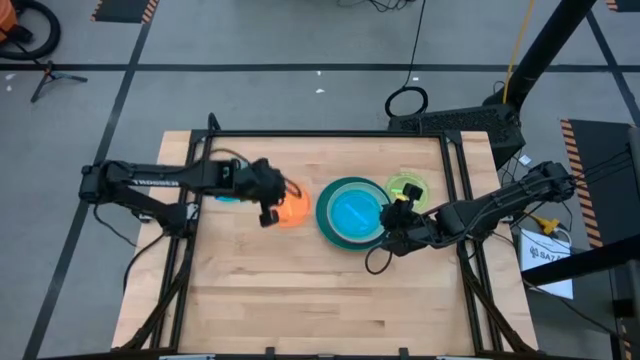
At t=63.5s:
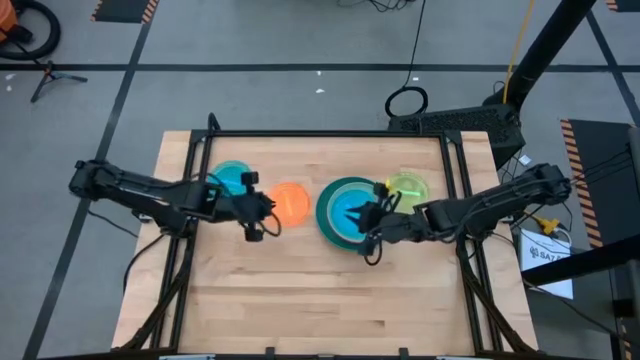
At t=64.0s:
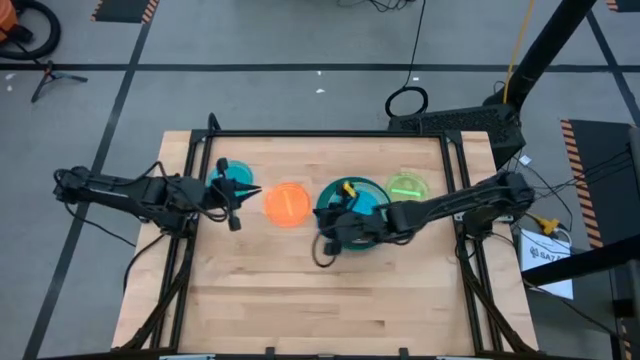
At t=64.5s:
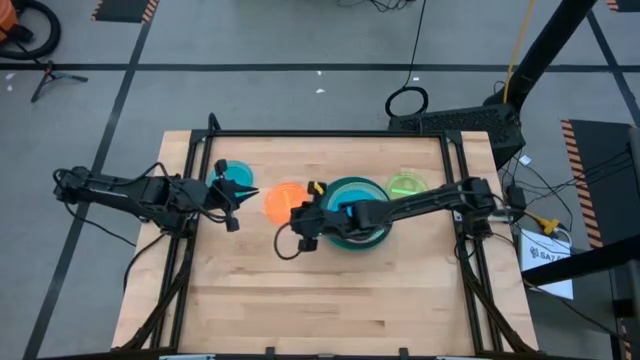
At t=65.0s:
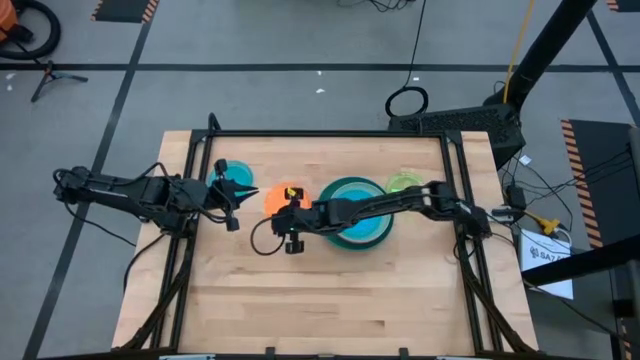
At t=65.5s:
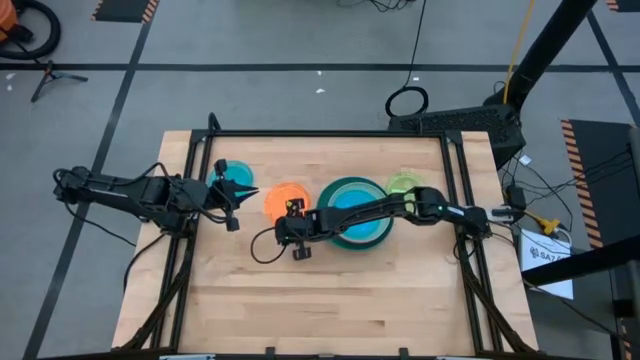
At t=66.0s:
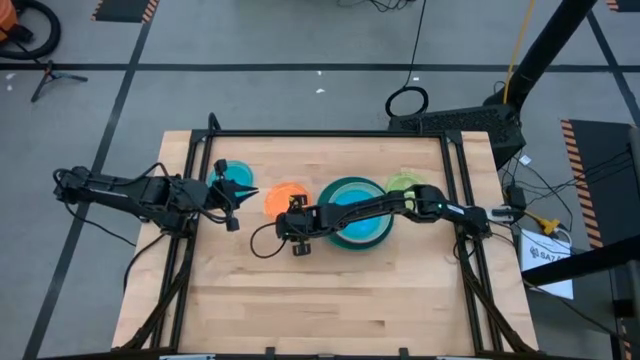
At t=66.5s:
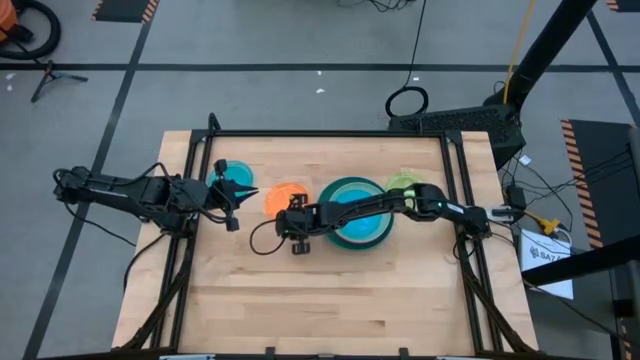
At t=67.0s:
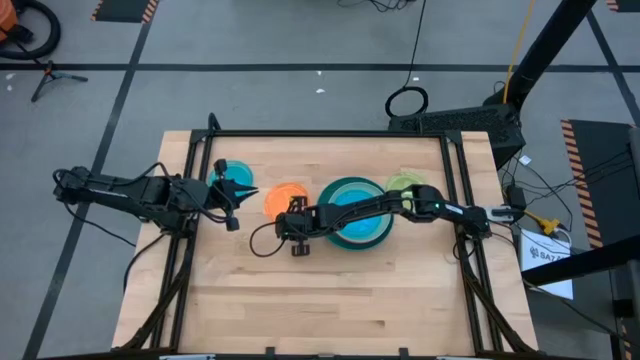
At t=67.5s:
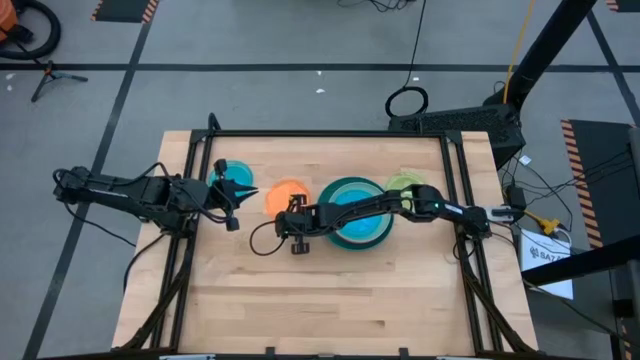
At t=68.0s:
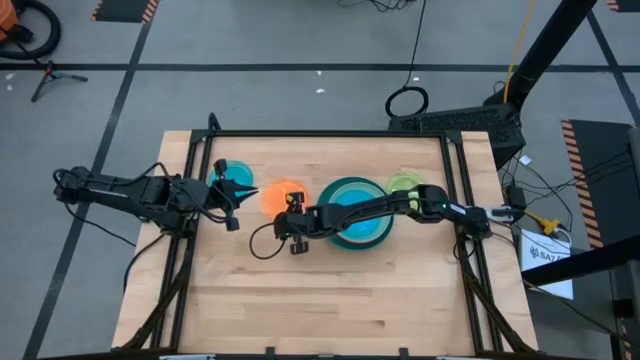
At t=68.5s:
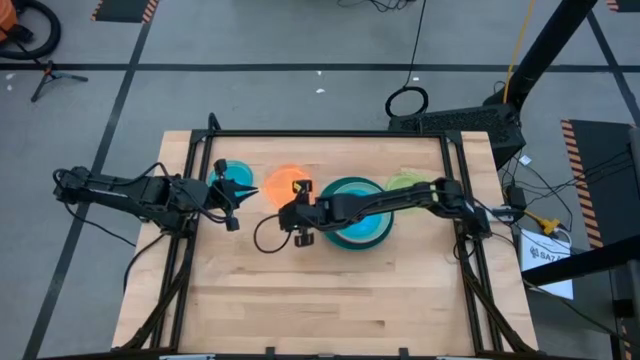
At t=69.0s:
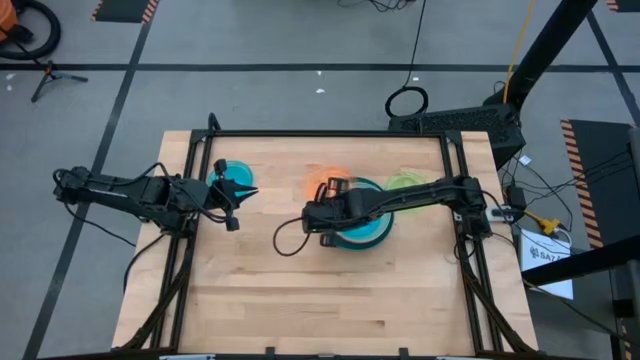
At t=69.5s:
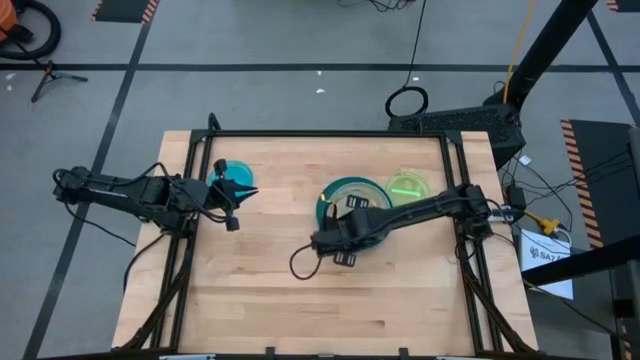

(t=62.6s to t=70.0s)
Task: Stack plastic plates
Stack the orange plate on top of the blue plate

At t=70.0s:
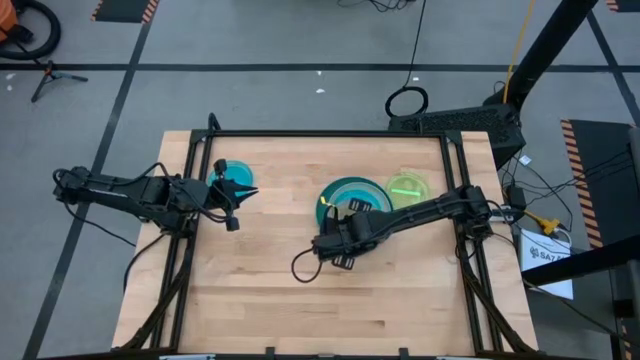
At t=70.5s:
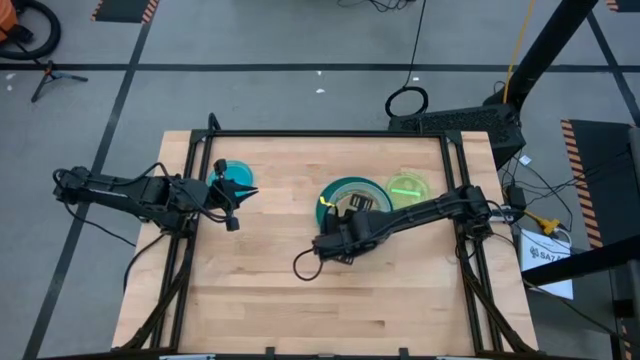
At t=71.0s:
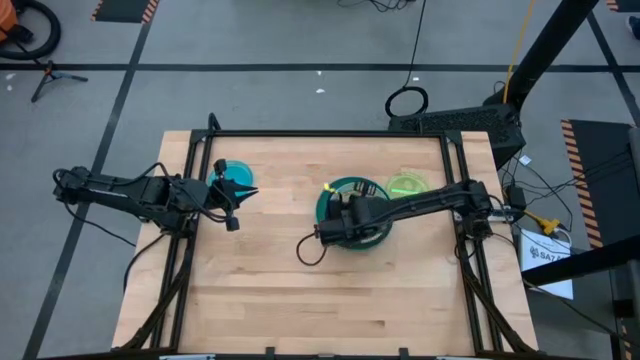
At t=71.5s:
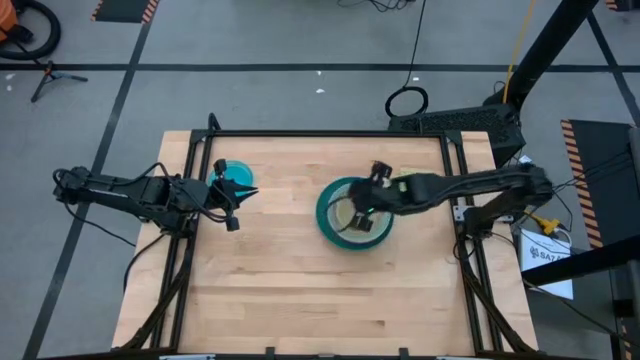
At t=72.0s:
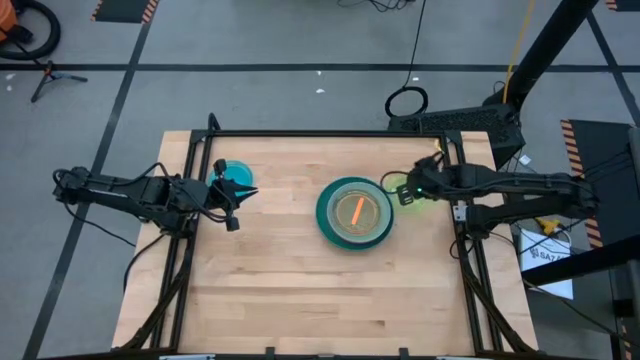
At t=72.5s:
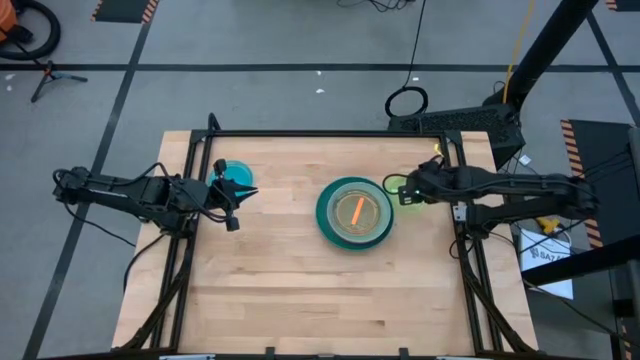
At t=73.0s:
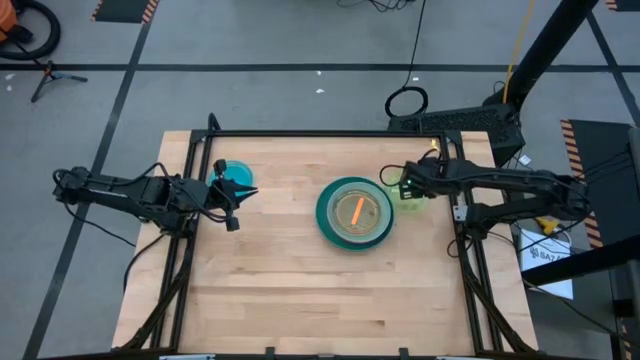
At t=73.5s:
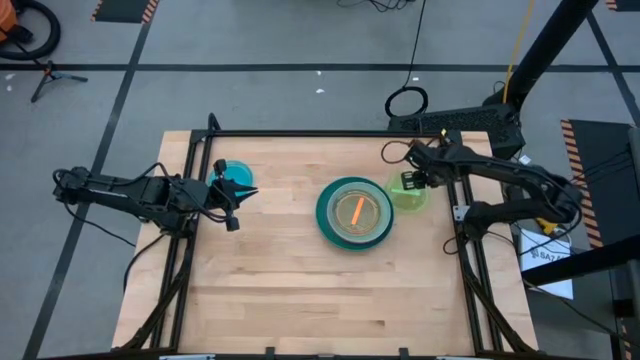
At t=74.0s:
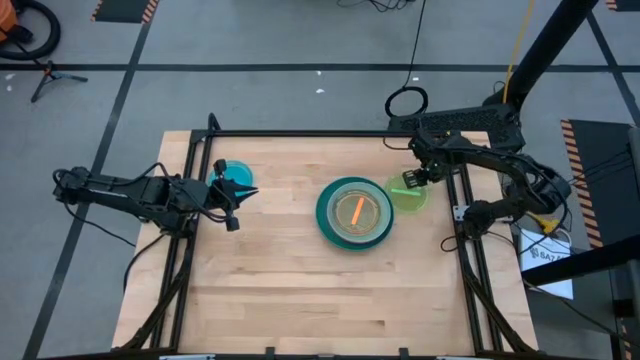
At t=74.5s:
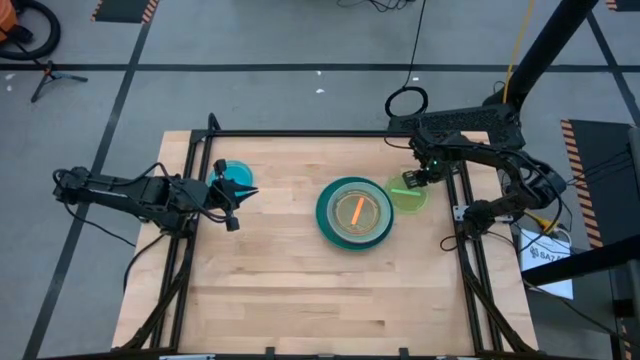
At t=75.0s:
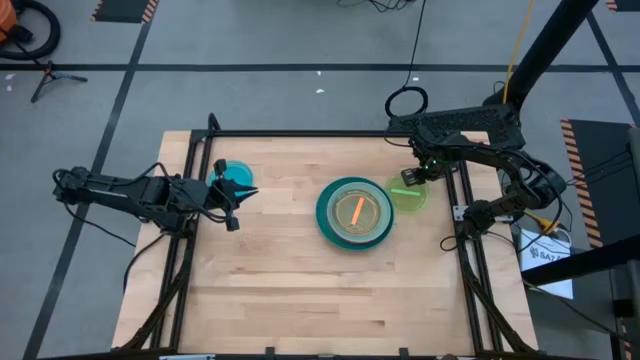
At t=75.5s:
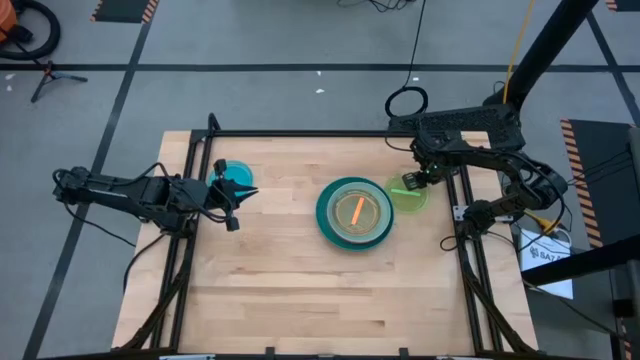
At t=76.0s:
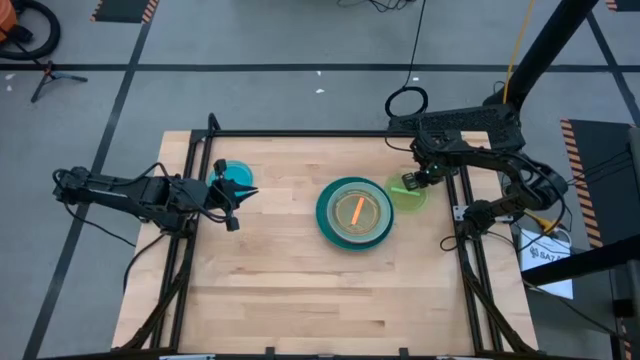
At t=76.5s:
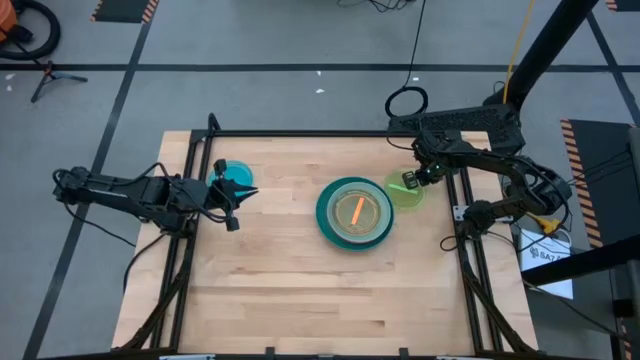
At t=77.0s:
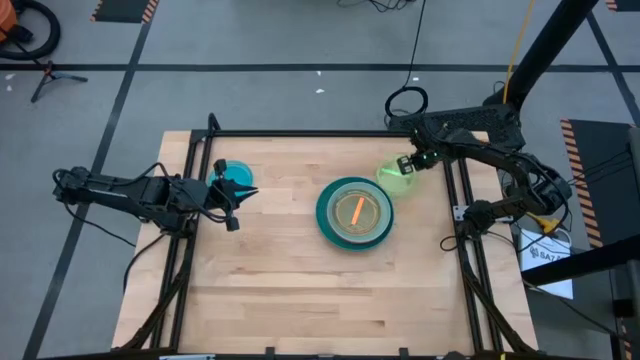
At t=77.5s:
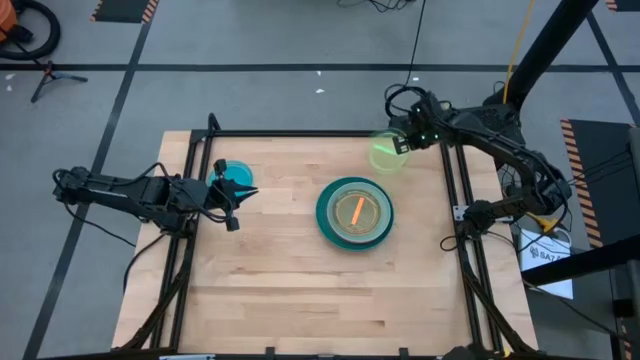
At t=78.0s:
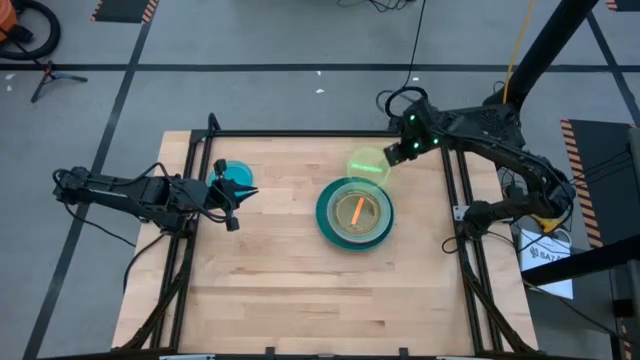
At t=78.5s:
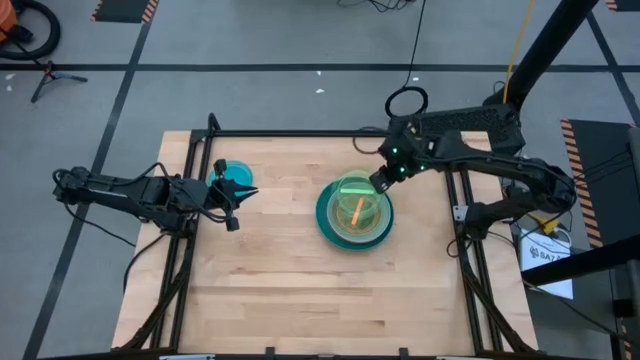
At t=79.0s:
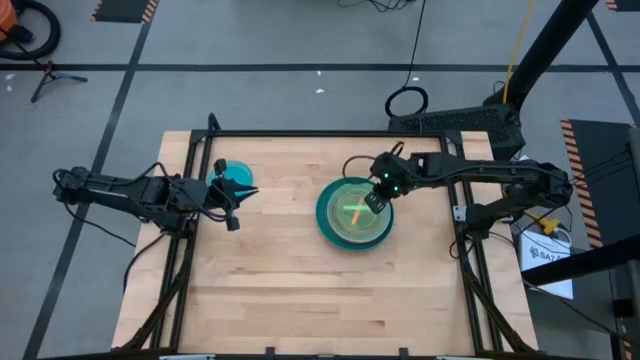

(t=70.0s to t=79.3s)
Stack the green plate on top of the orange plate

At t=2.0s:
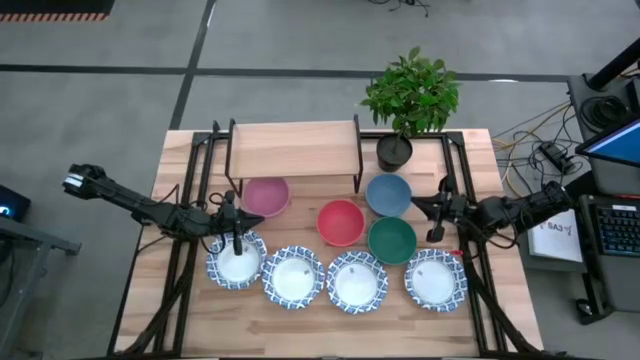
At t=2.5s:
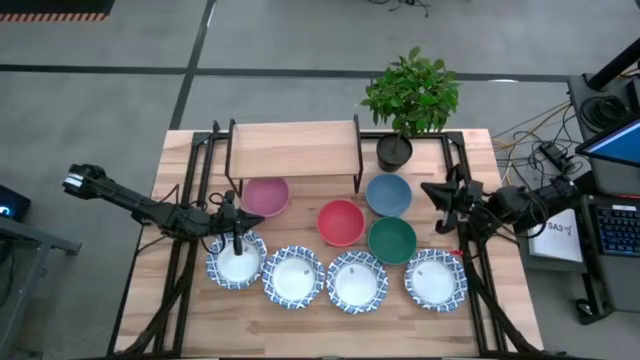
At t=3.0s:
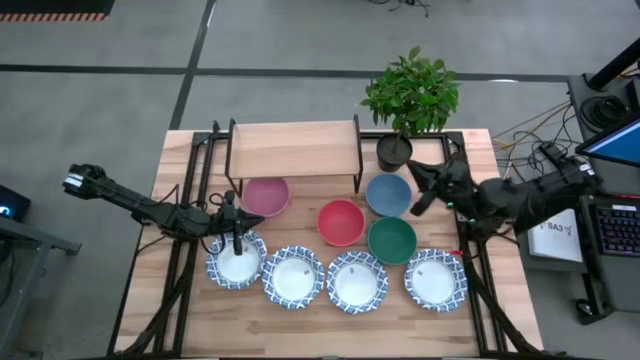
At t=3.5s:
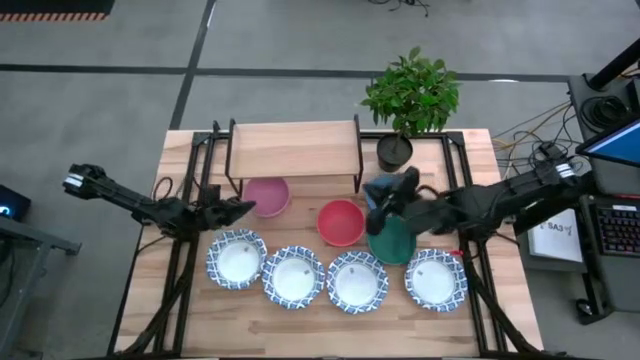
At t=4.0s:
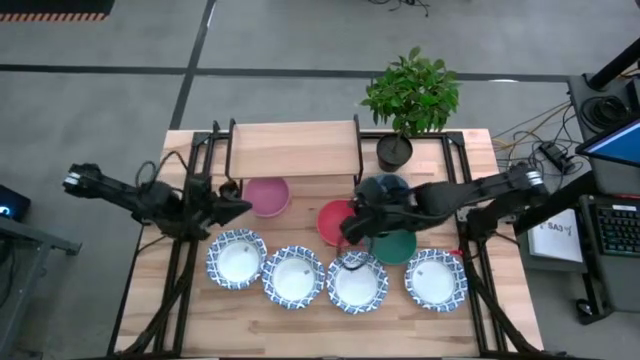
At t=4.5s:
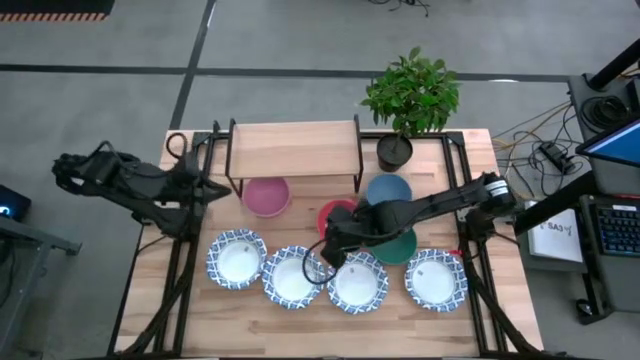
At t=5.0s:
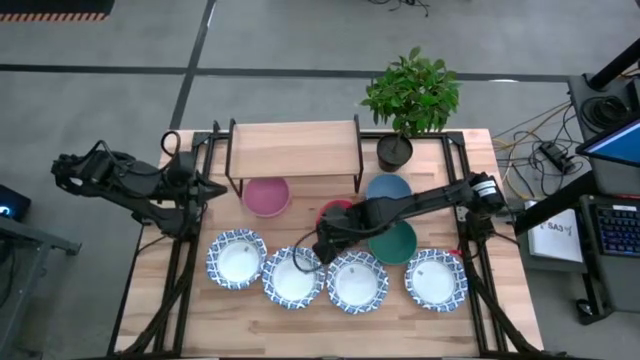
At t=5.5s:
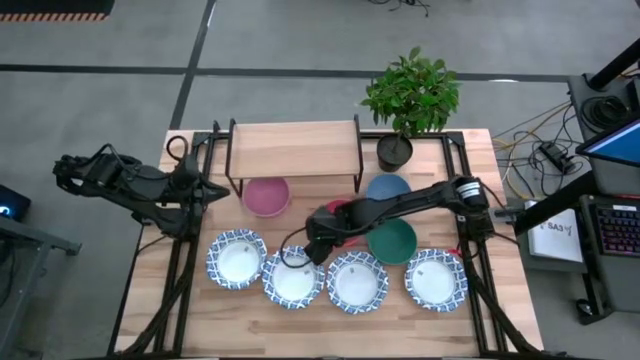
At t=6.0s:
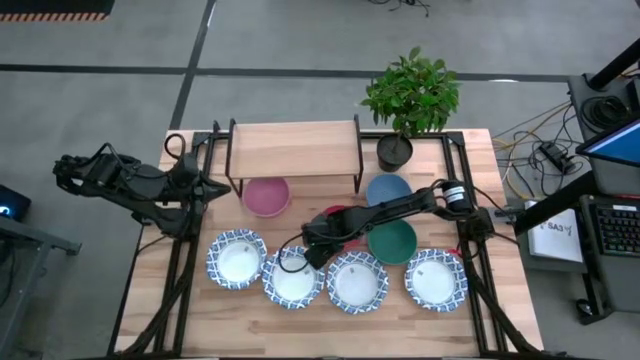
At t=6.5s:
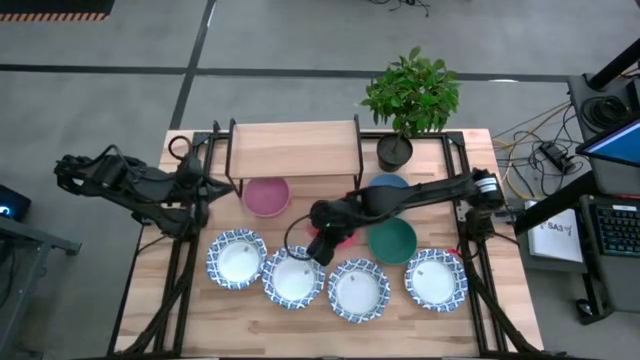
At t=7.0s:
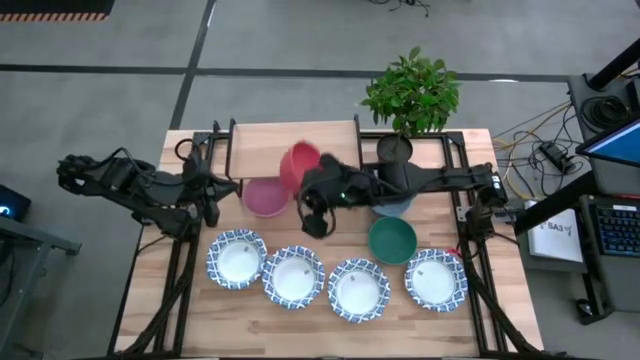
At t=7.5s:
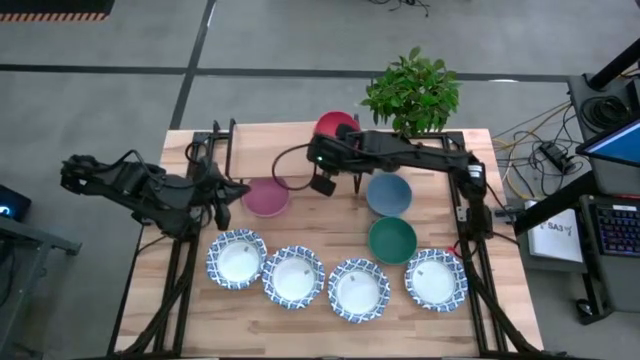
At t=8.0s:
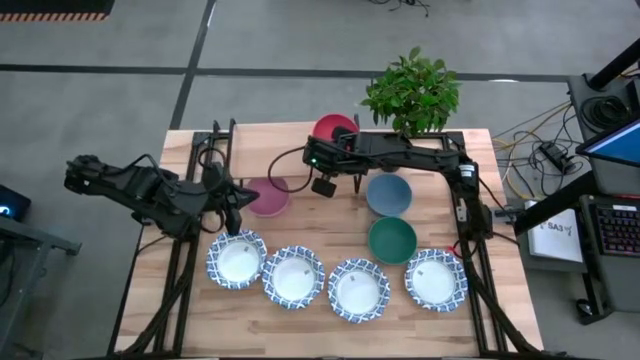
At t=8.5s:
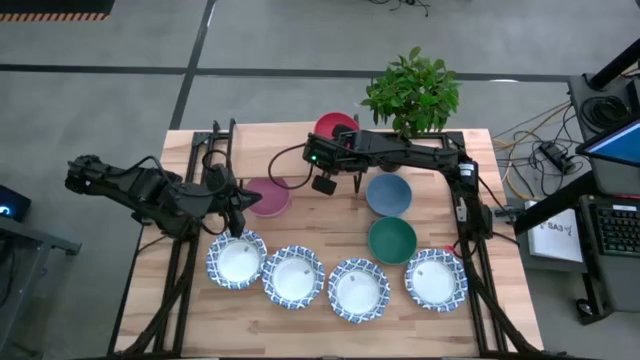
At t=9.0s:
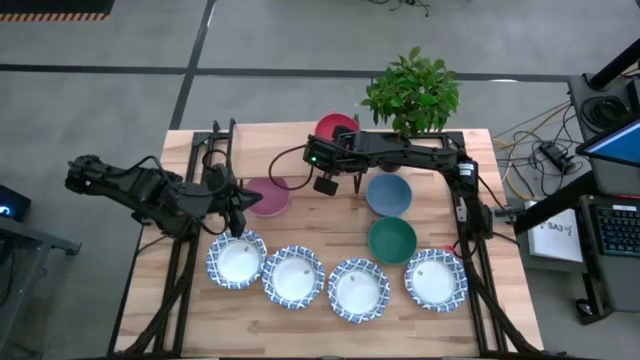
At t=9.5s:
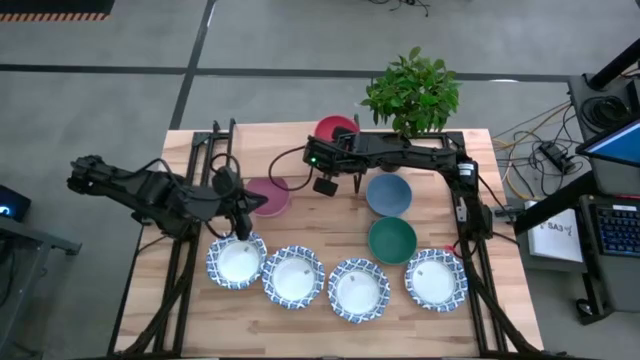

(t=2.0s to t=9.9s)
Task: Place and stack bowls onto a shelf
Put the red plastic bowl on the shelf
